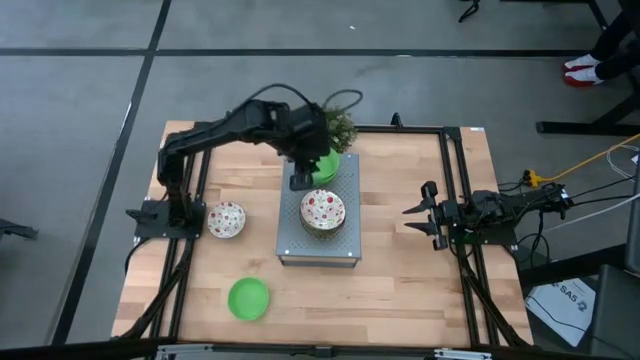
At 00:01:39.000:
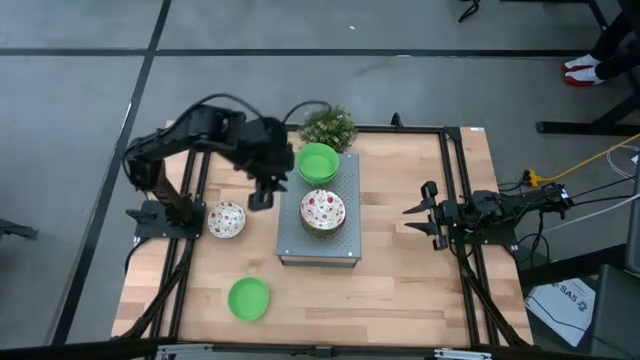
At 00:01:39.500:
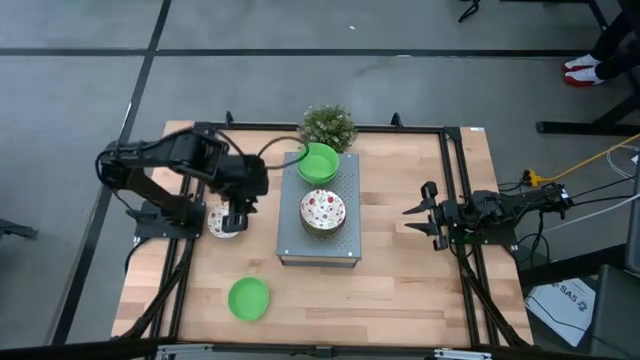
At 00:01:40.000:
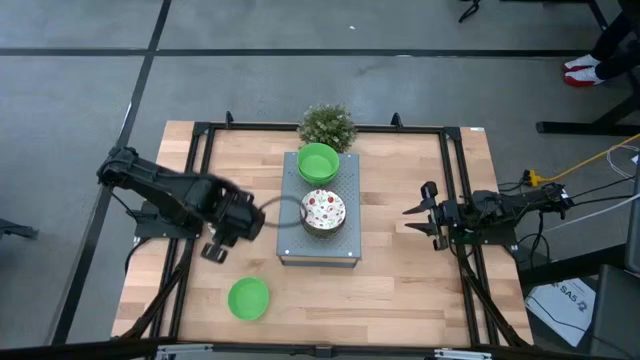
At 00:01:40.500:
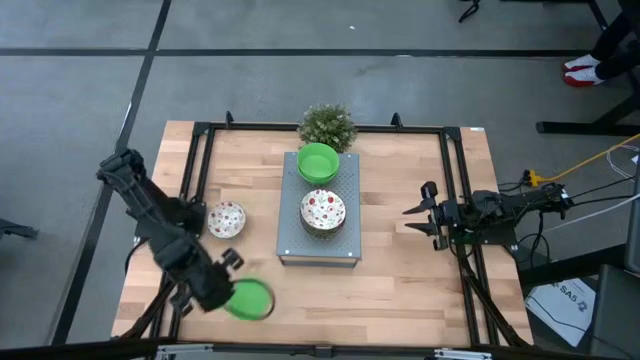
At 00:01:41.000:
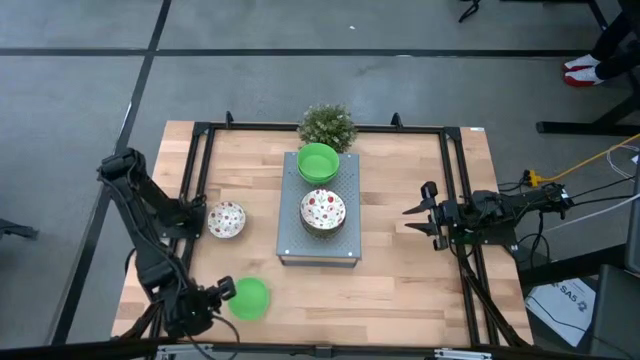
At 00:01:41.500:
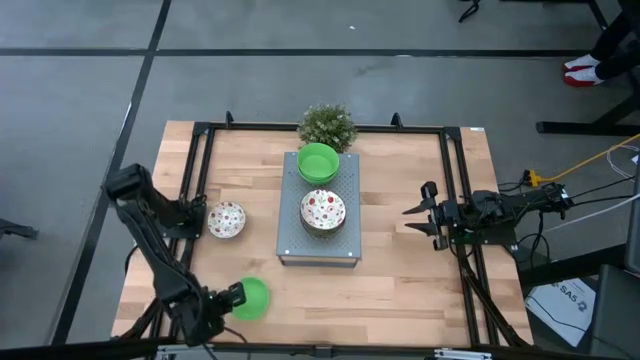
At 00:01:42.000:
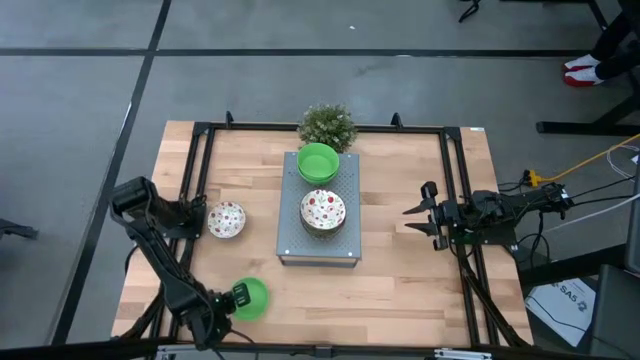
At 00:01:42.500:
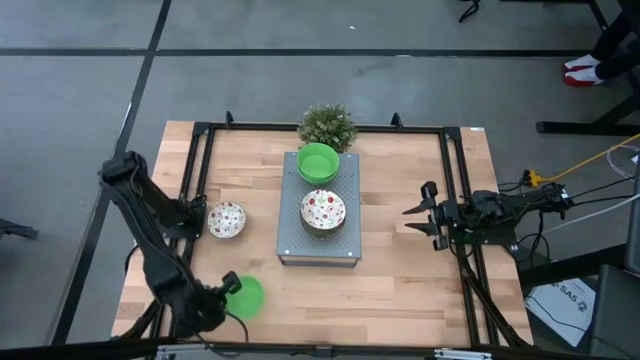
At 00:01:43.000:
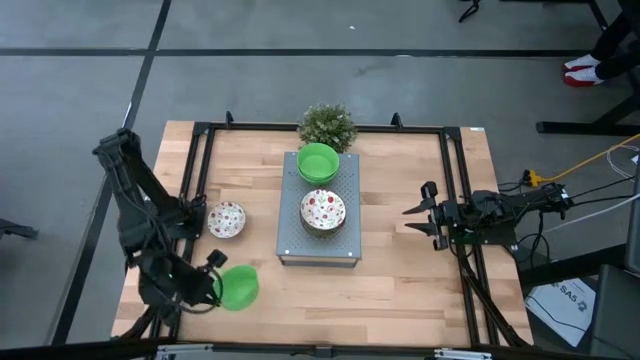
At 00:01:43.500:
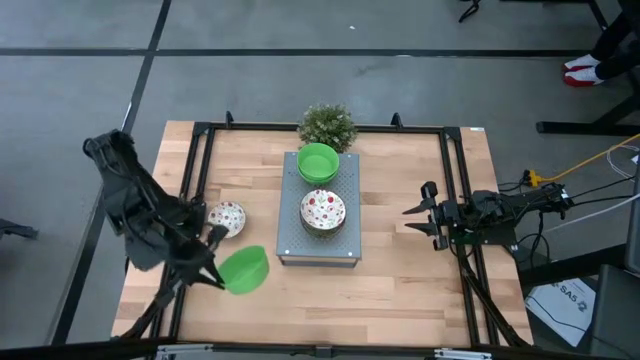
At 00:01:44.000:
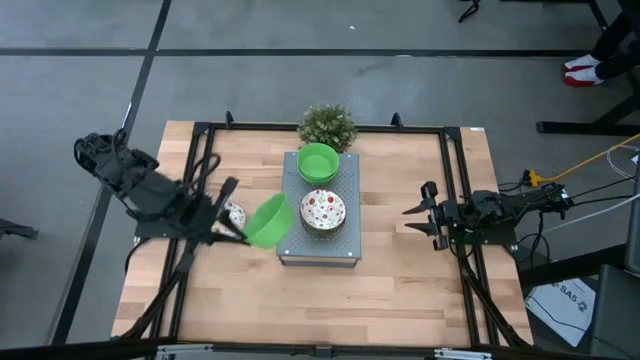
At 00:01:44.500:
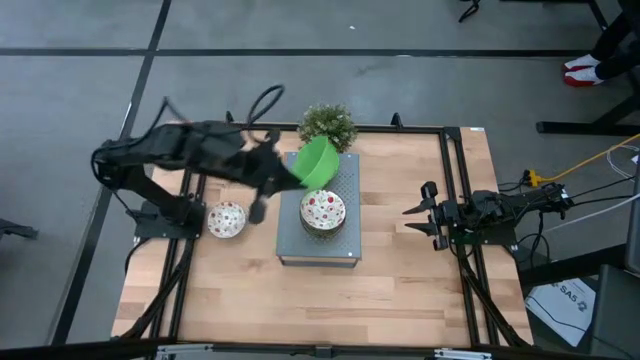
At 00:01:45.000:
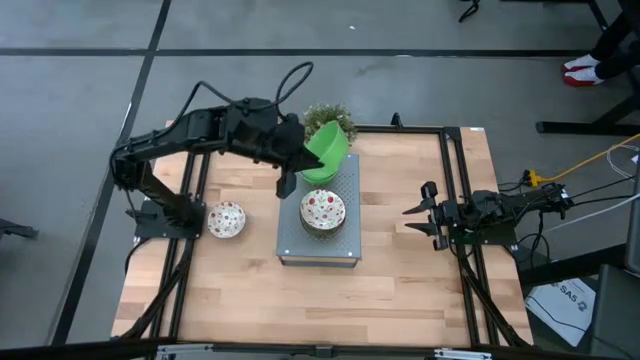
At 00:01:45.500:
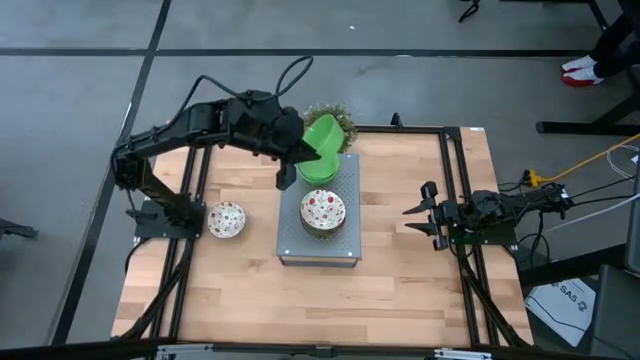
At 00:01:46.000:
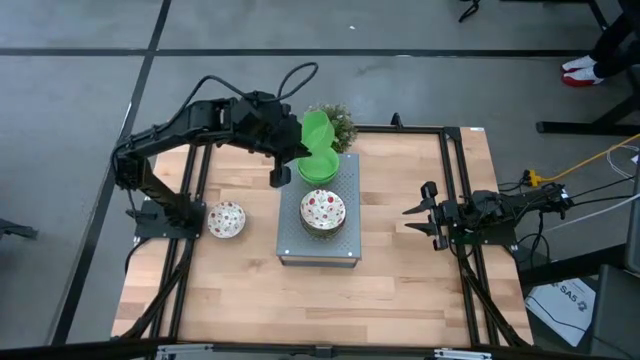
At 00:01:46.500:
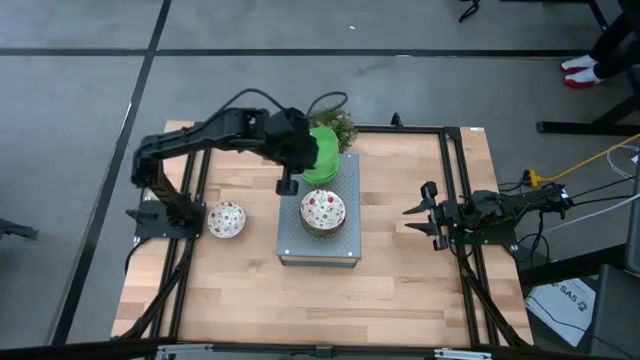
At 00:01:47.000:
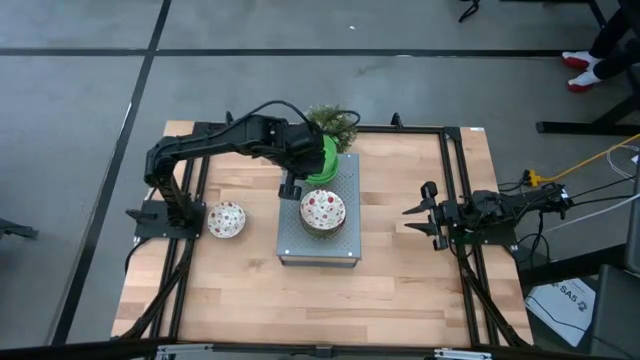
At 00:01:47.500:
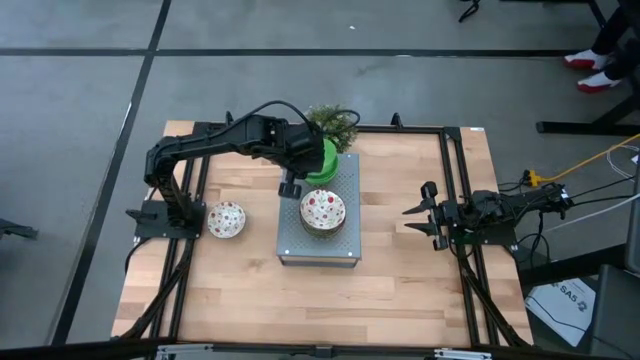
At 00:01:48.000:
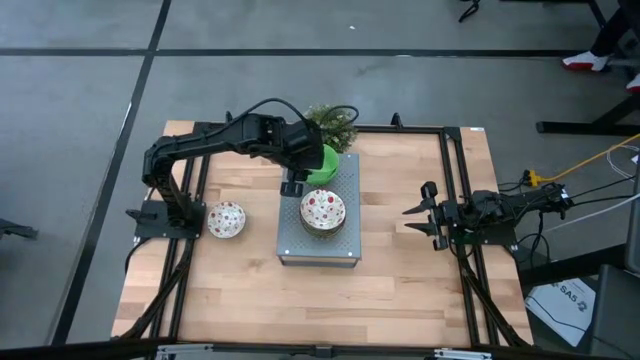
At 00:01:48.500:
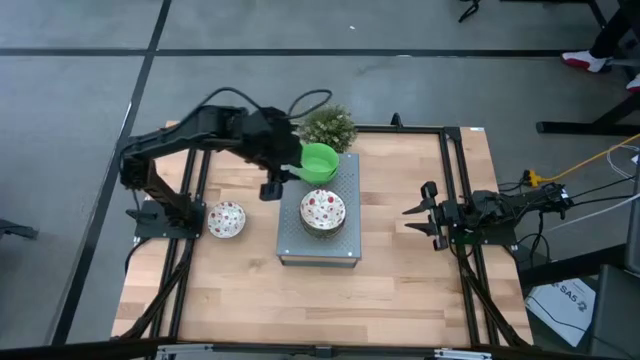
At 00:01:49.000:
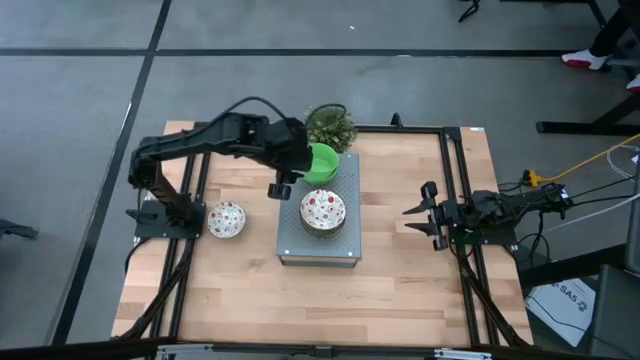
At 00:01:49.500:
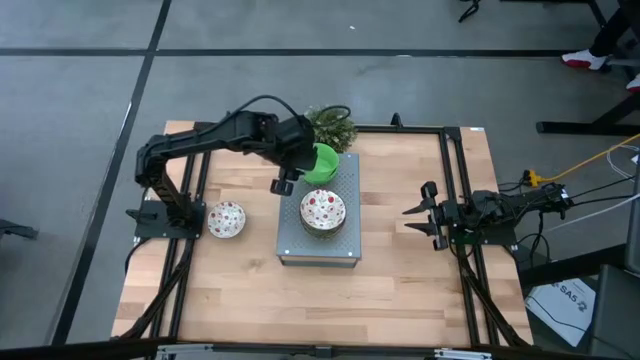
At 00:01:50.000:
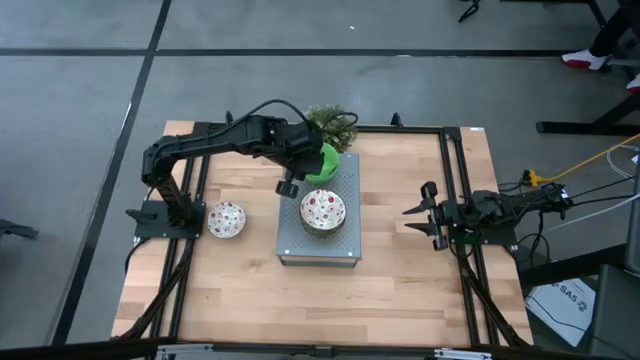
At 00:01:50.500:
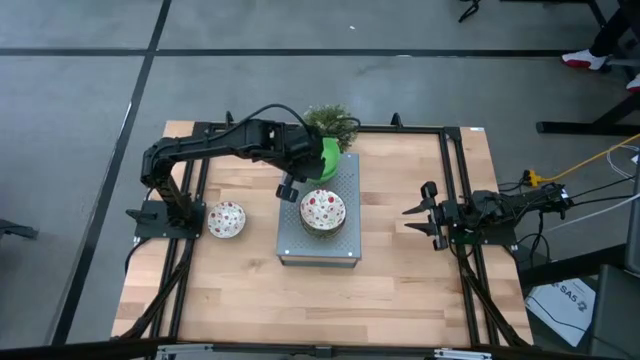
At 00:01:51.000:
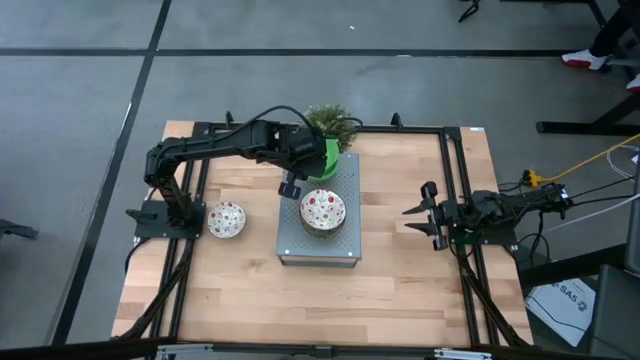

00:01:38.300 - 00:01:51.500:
Task: Pick & Place Mini bowls
Stack the green bowl on the green bowl on the shelf

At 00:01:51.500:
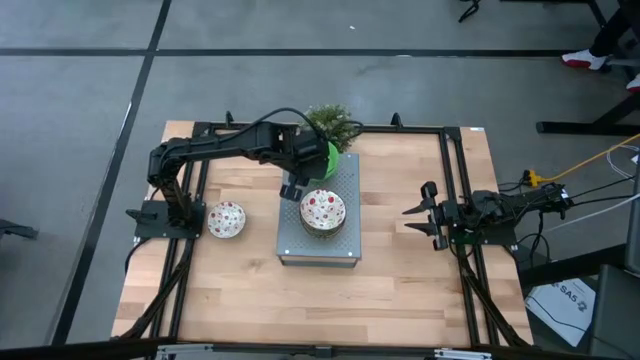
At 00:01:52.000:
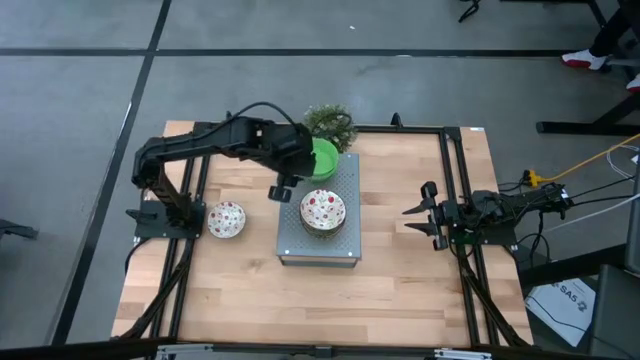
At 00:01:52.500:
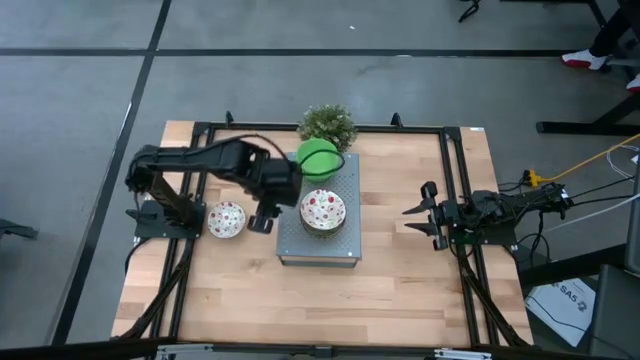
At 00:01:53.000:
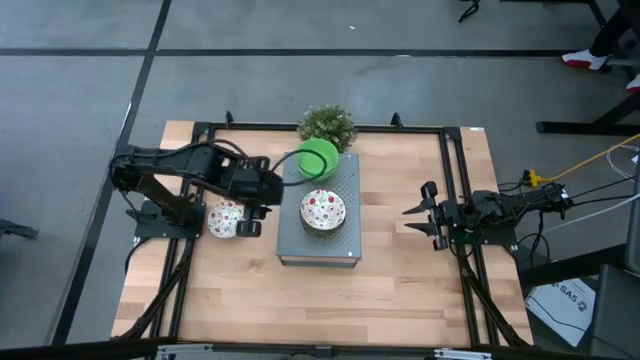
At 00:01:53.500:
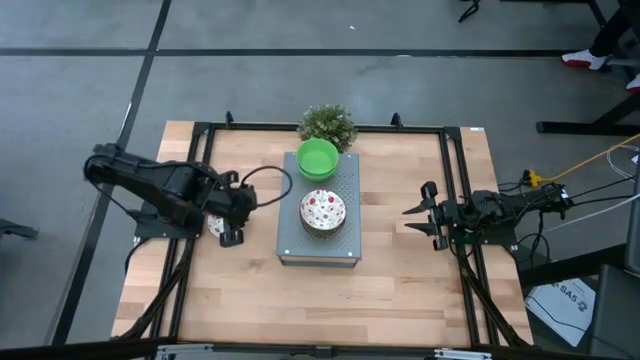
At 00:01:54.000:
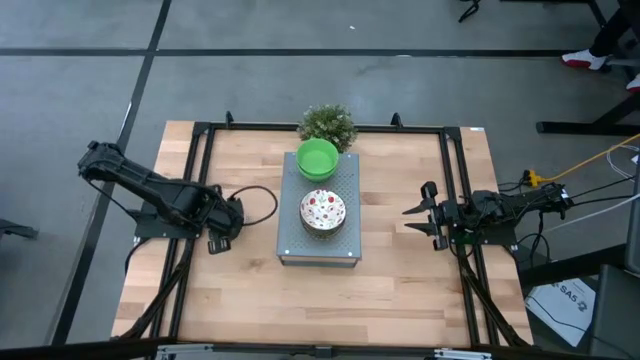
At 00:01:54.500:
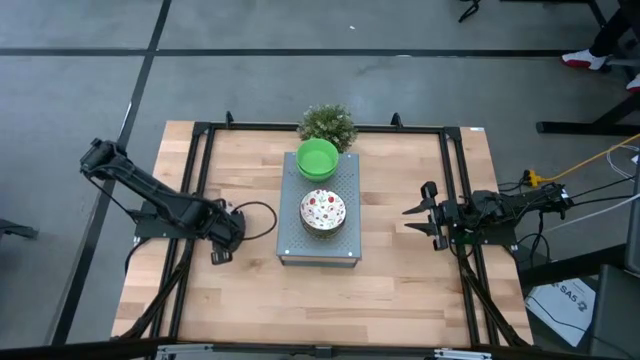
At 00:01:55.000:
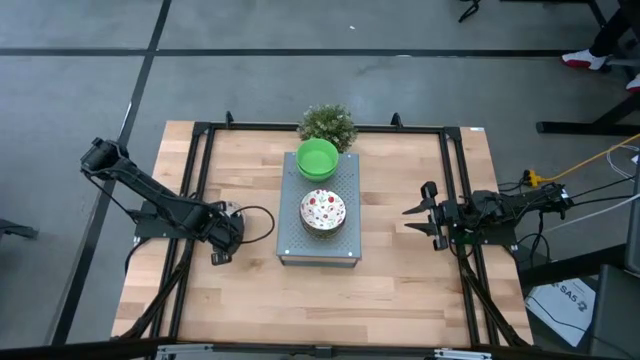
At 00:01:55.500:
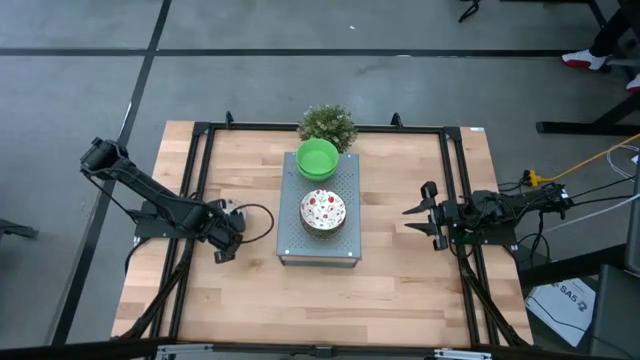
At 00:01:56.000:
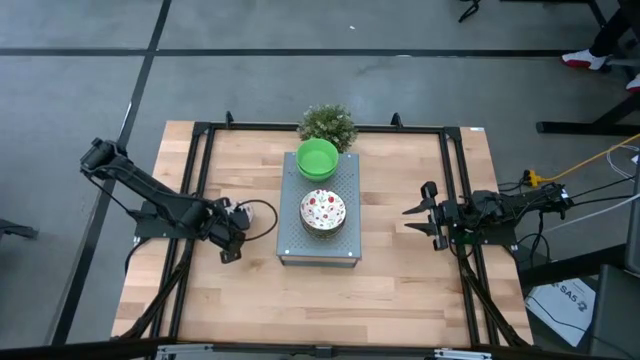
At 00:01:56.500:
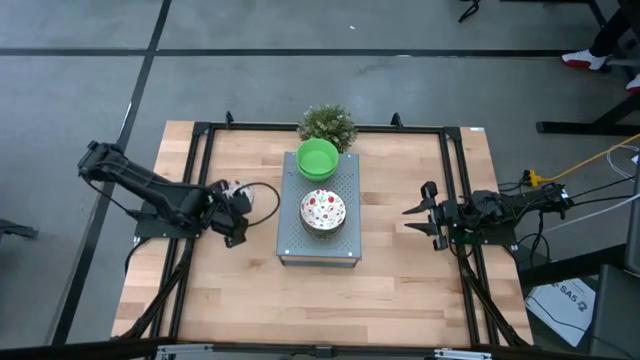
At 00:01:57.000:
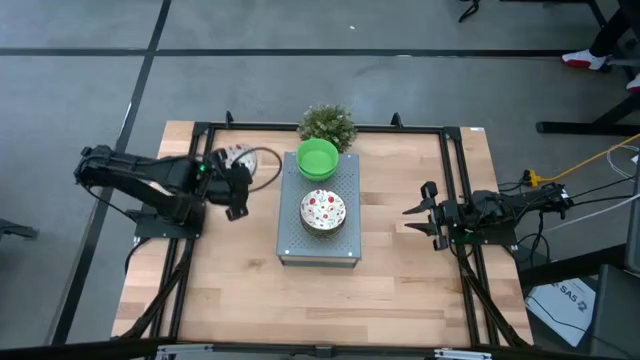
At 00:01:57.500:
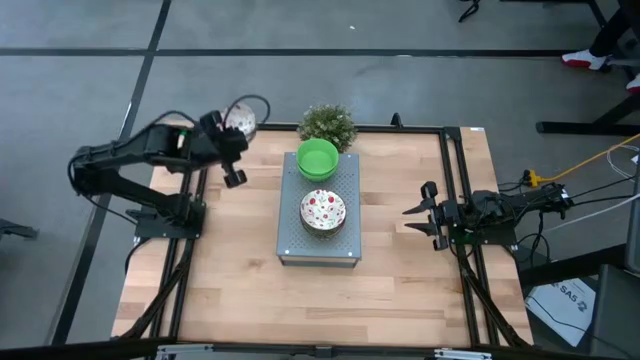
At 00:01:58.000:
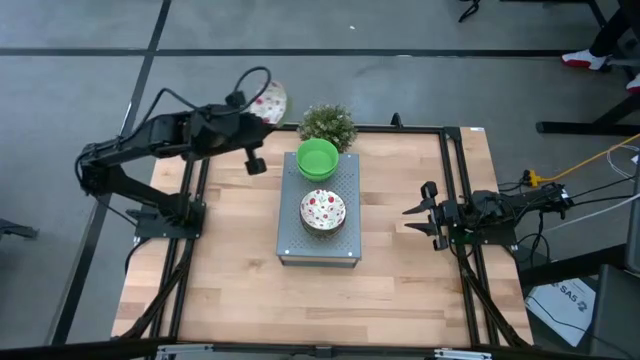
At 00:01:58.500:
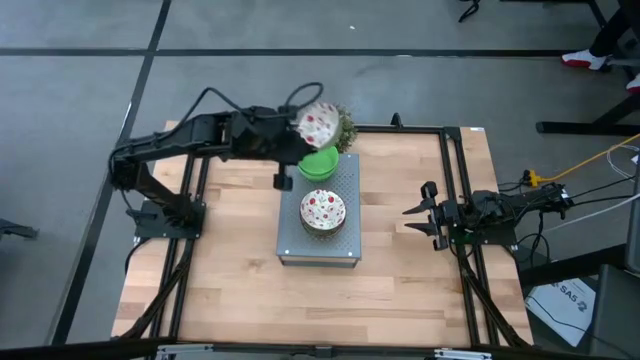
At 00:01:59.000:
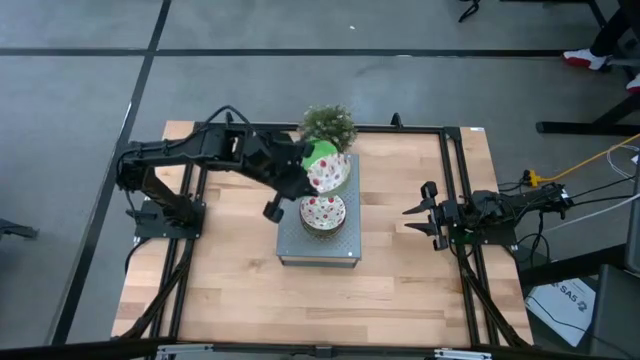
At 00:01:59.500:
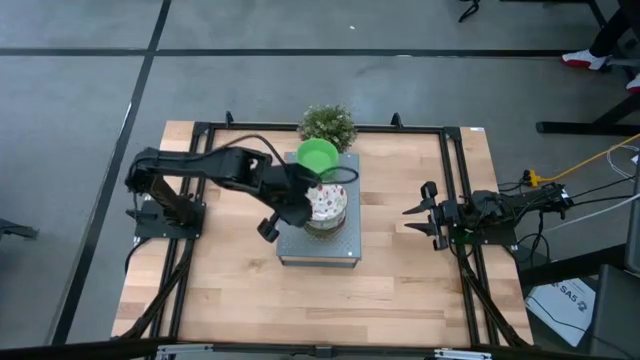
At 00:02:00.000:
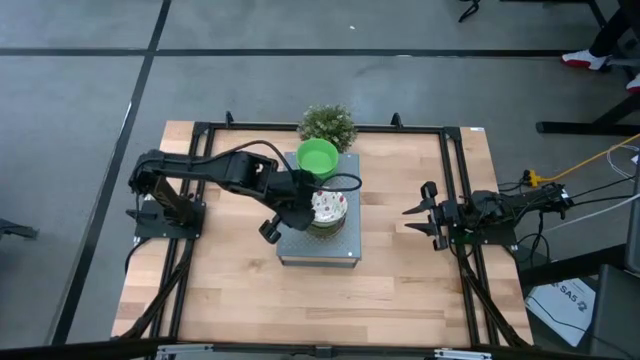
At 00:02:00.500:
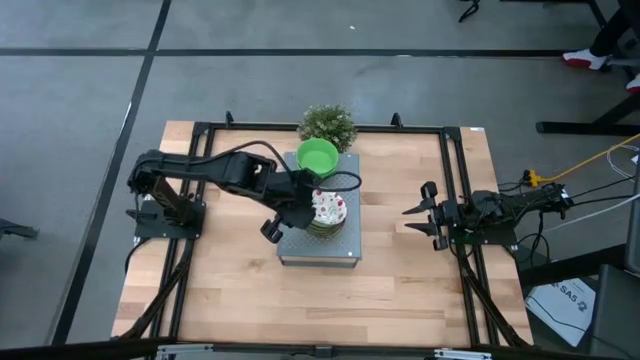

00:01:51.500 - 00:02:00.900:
Stack the red patterned bowl on the red patterned bowl on the shelf
